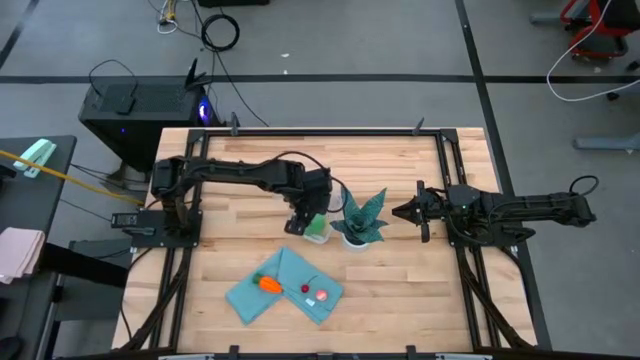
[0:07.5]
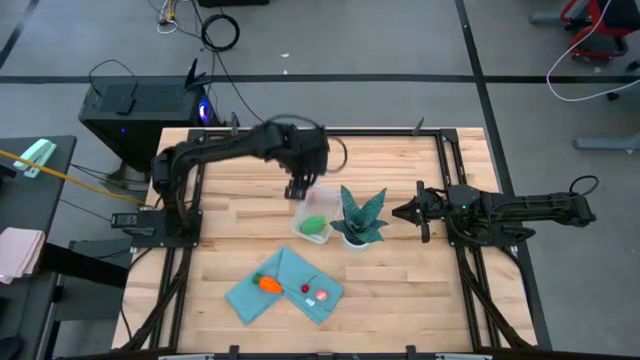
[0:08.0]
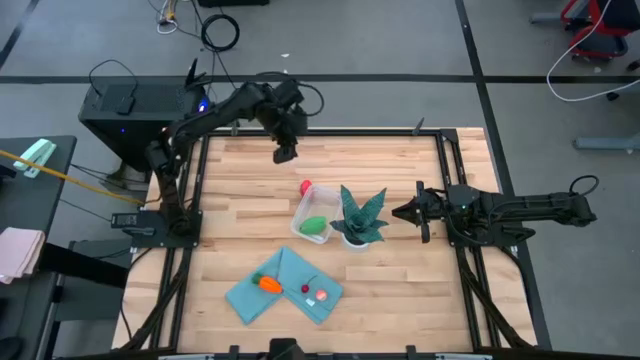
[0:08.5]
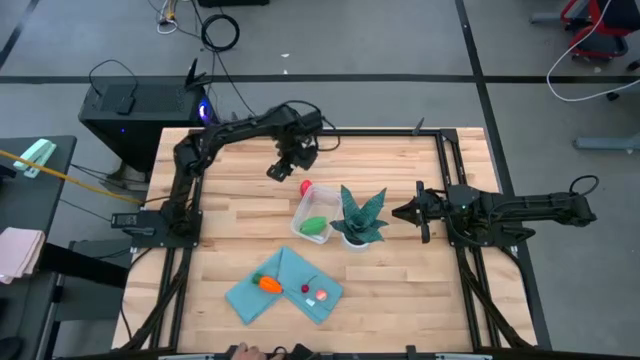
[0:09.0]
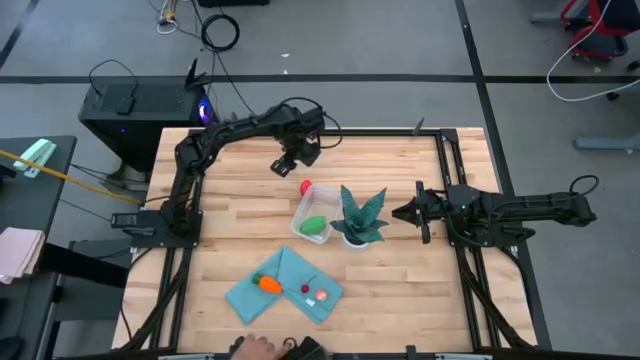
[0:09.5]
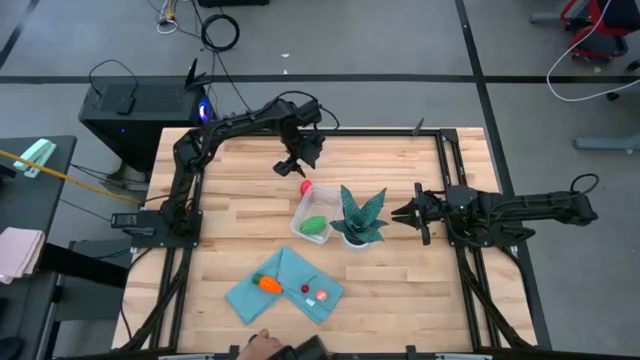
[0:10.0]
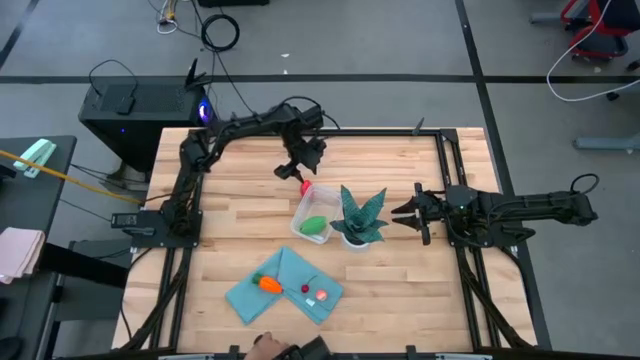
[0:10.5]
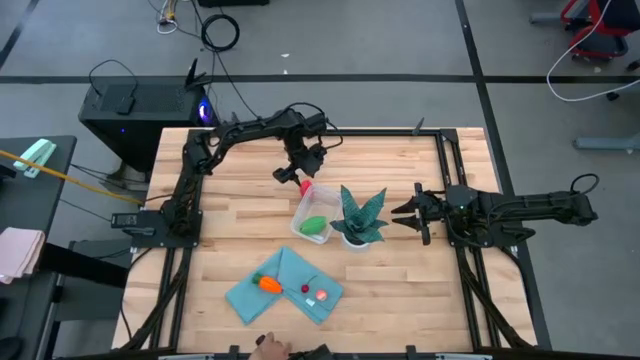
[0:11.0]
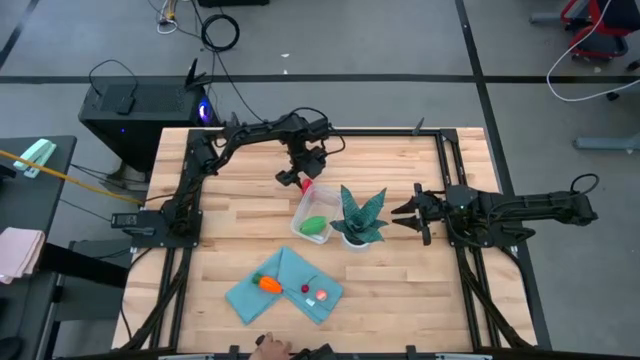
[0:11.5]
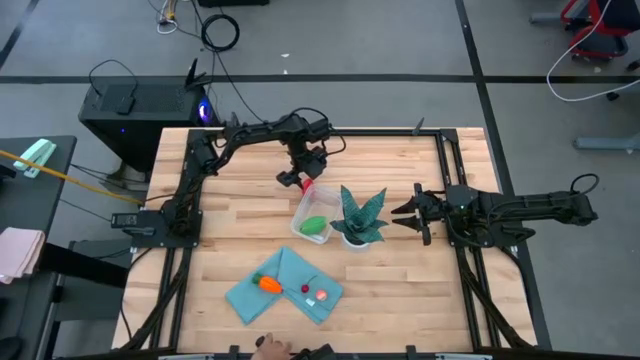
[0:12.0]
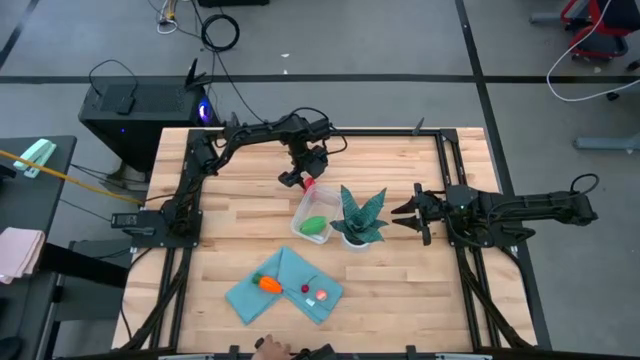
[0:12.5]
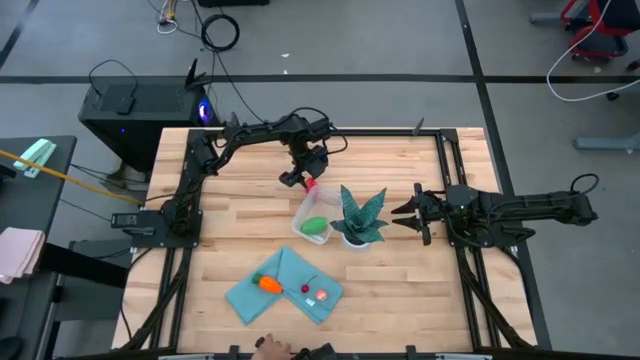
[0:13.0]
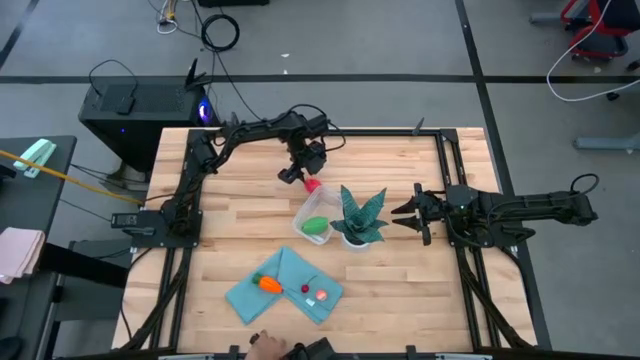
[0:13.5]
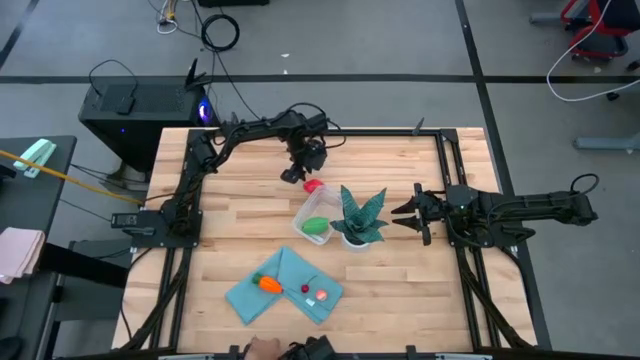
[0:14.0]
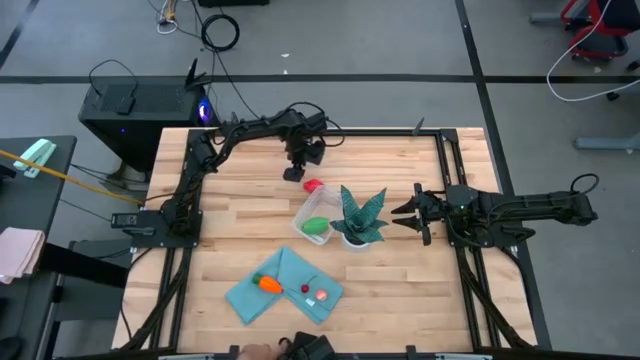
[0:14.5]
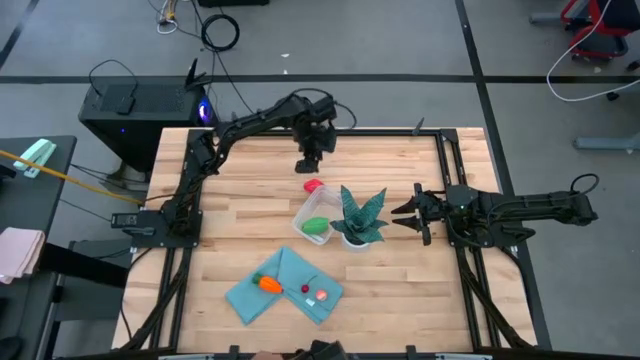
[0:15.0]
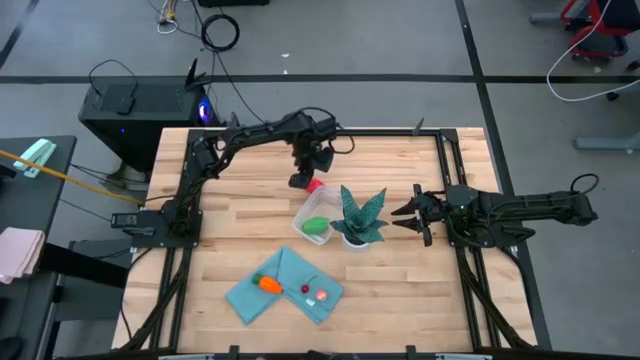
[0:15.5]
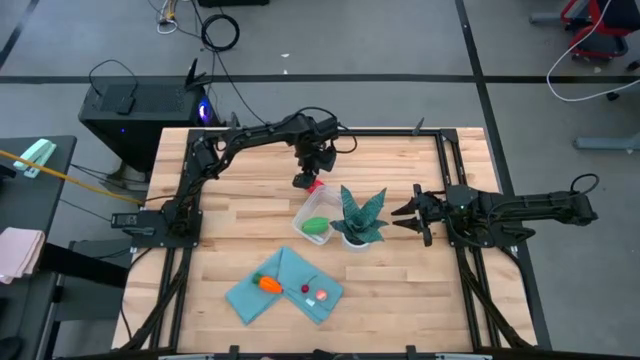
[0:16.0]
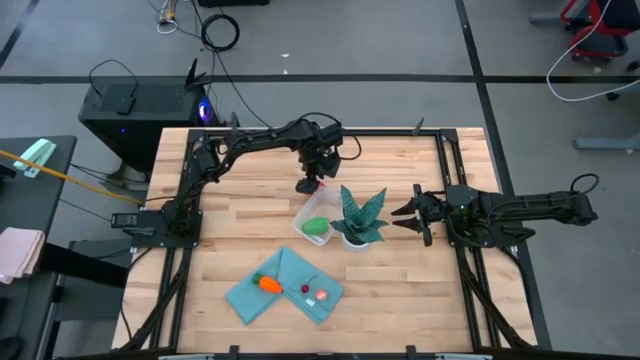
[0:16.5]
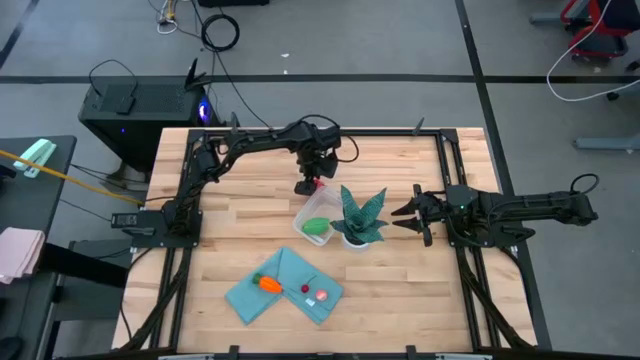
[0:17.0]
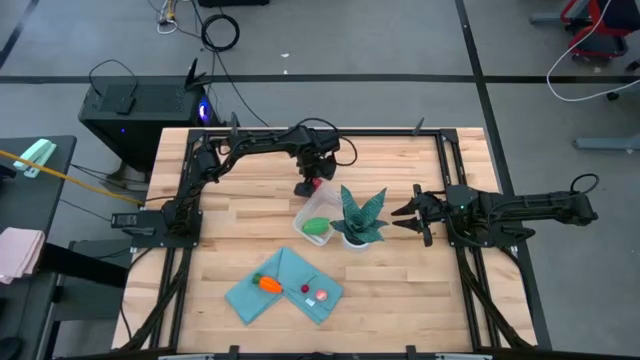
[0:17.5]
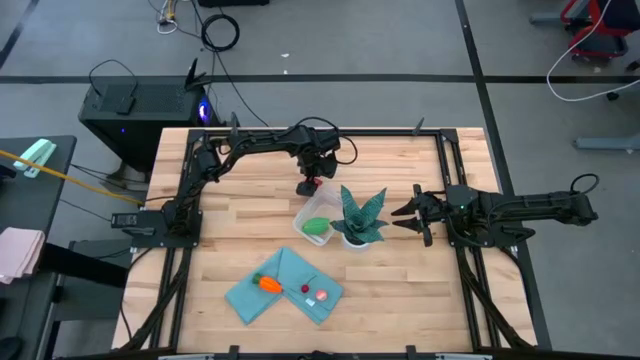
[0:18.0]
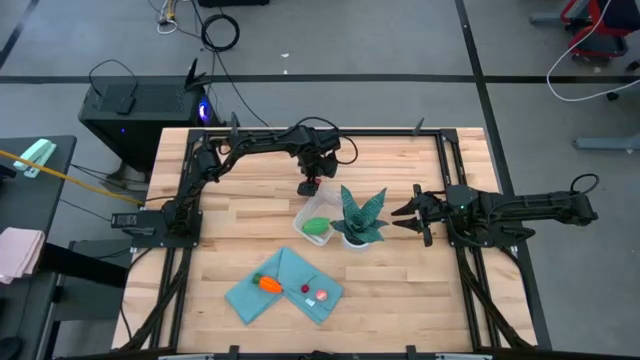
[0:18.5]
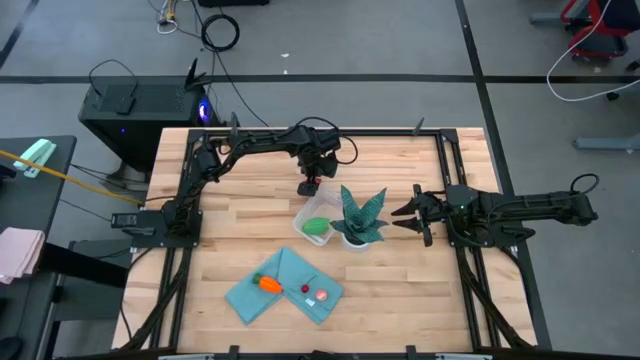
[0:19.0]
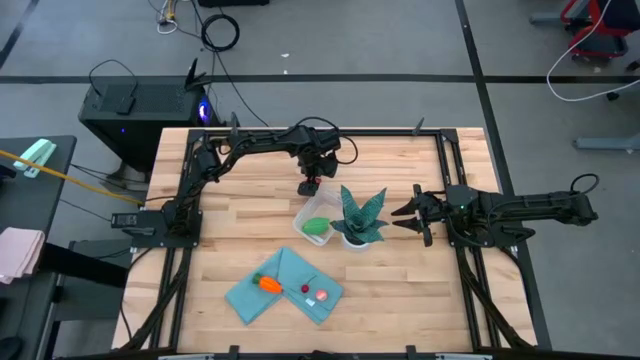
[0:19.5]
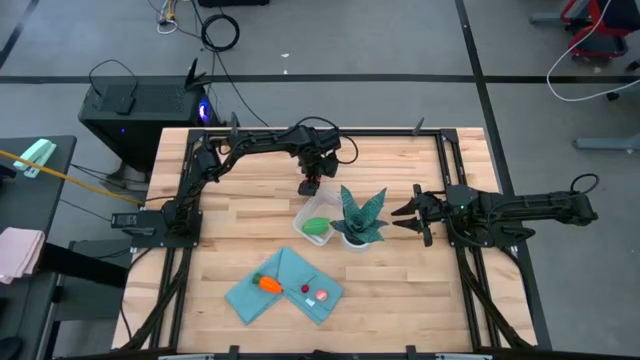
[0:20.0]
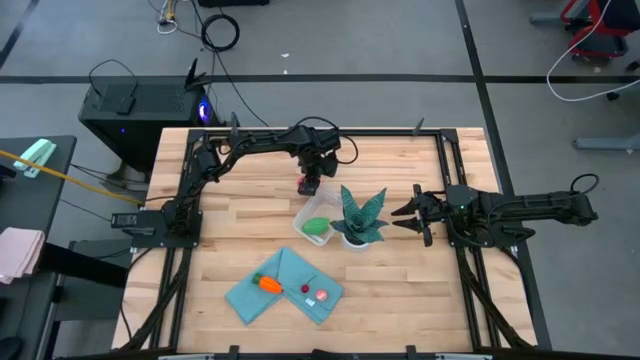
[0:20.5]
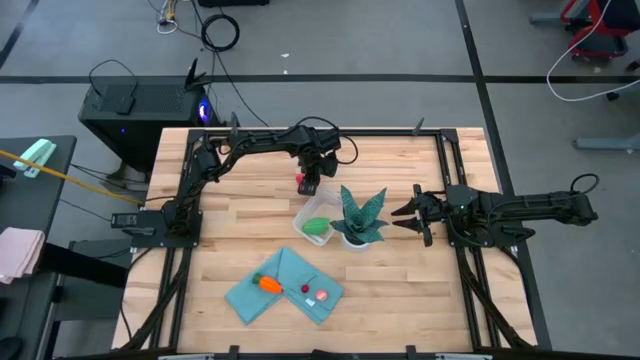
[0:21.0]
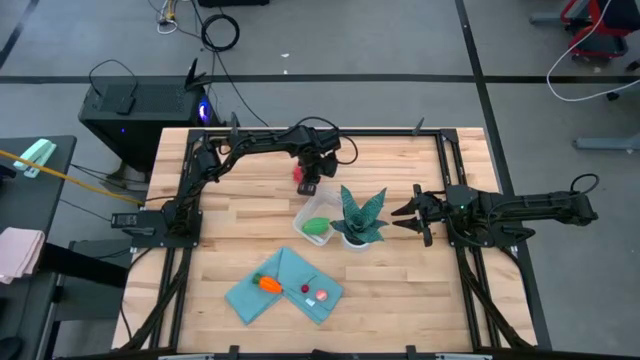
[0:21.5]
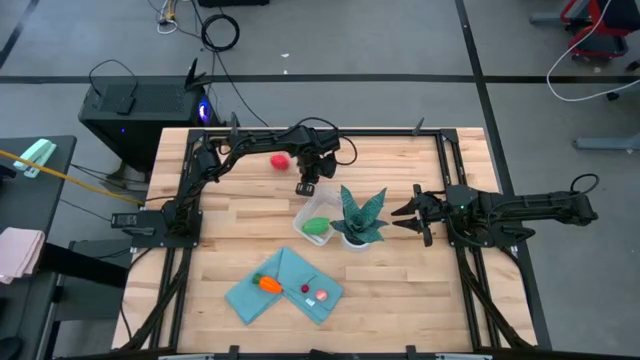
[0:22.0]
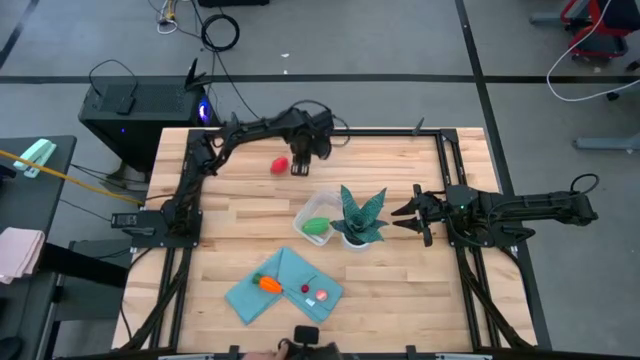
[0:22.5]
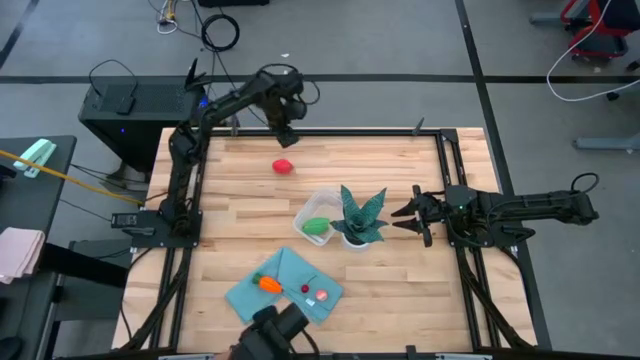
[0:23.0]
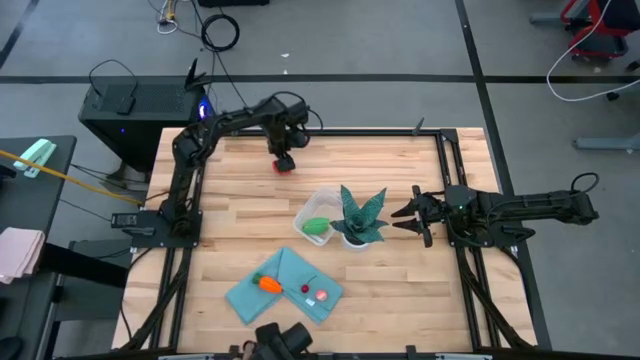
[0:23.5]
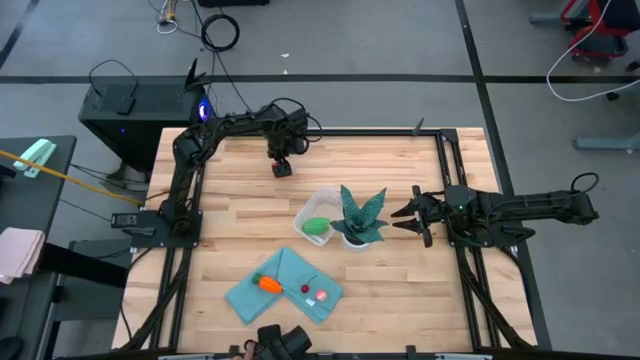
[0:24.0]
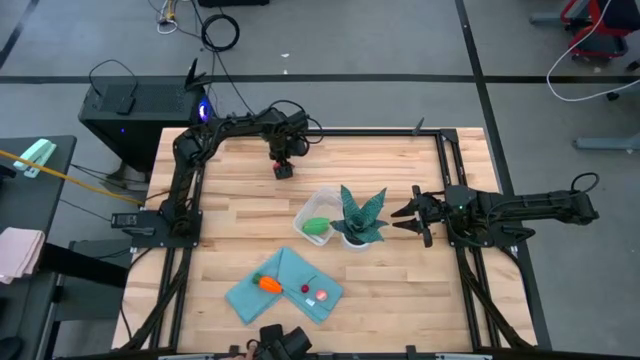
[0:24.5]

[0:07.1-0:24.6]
Task: Pick and placing Produce into tupperware
Put the dragon fruit into the container

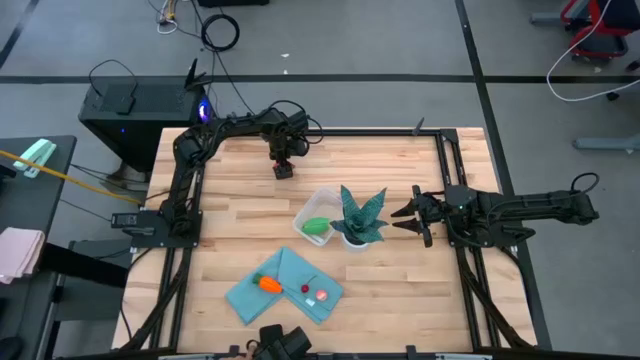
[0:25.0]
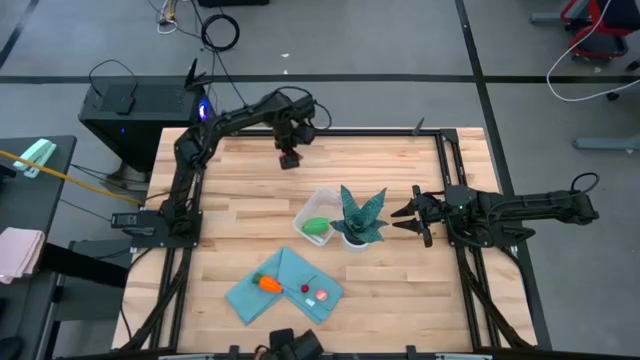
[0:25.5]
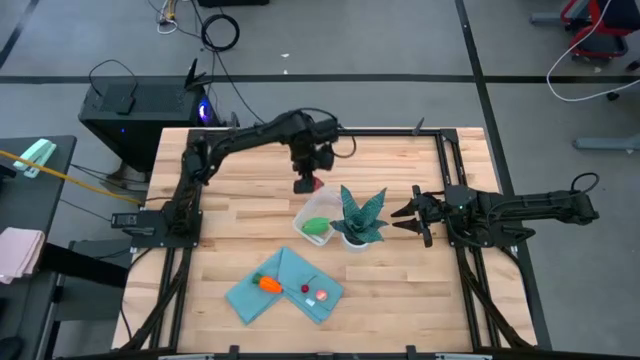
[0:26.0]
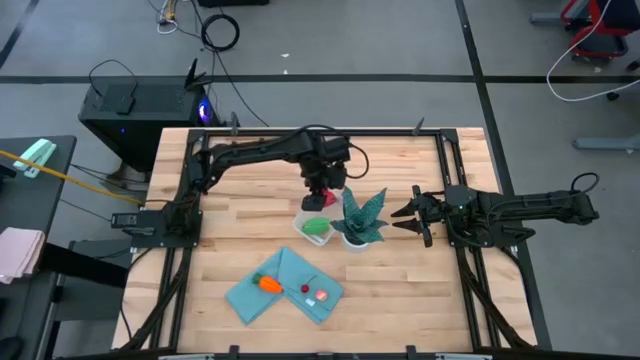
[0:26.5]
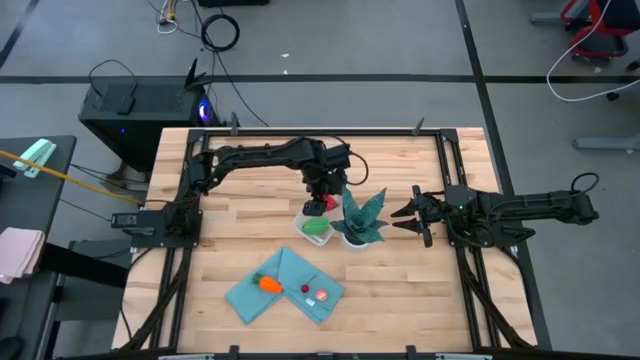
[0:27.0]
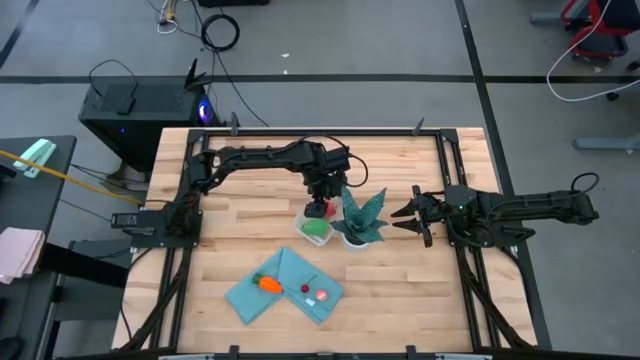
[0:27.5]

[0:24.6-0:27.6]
Put the dragon fruit into the container
